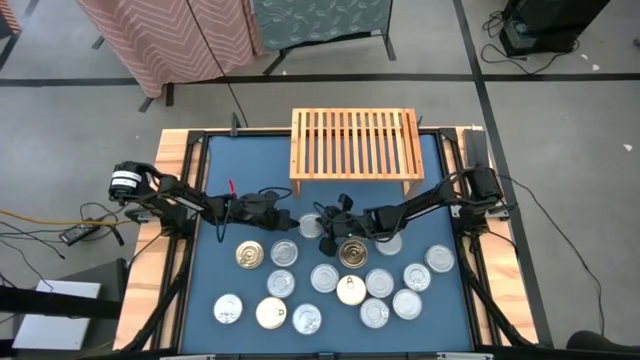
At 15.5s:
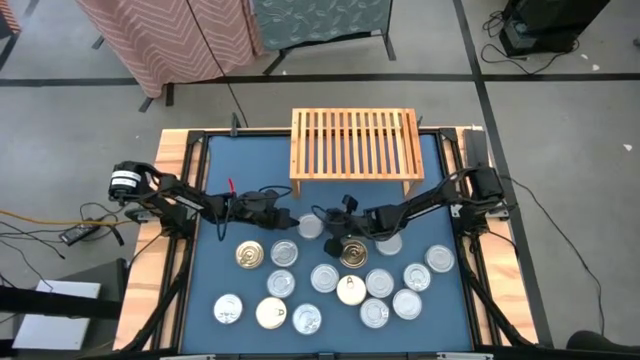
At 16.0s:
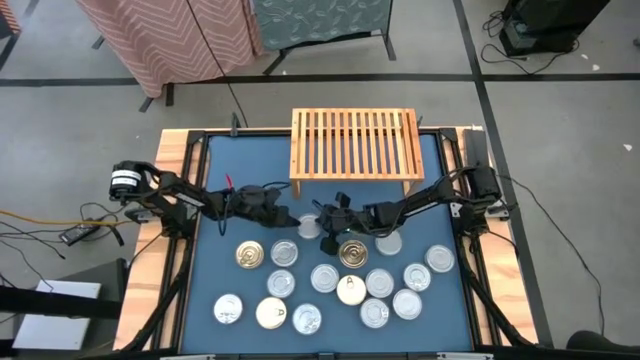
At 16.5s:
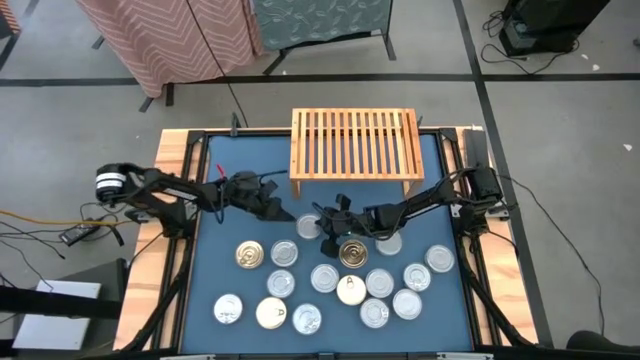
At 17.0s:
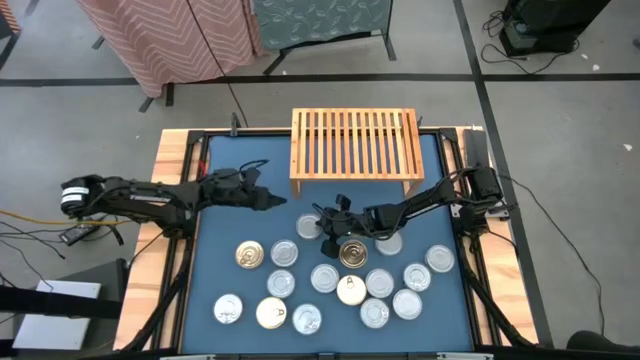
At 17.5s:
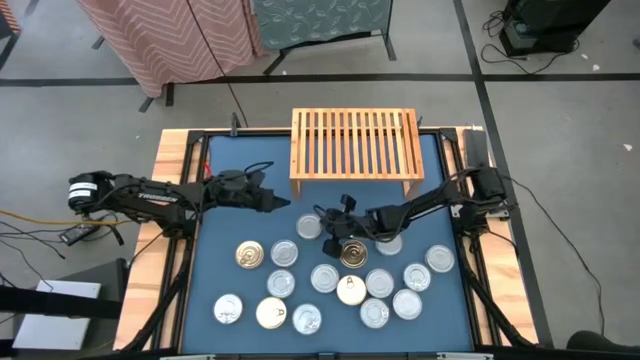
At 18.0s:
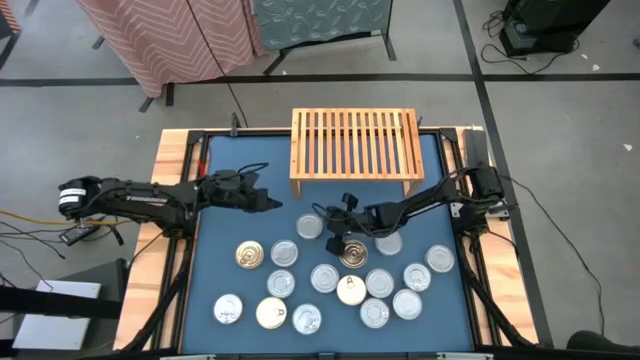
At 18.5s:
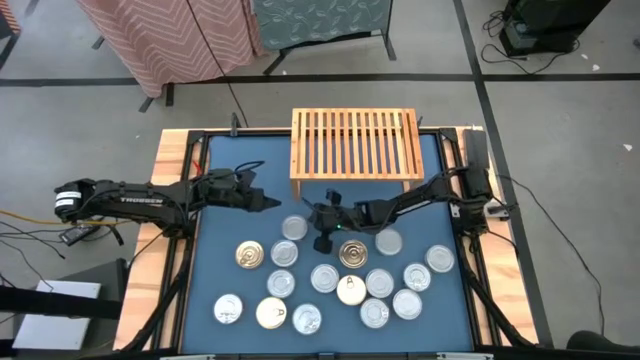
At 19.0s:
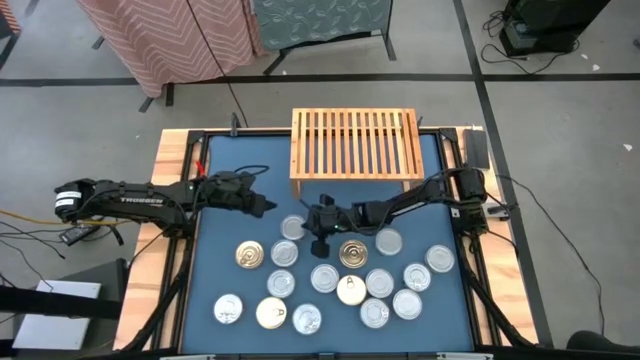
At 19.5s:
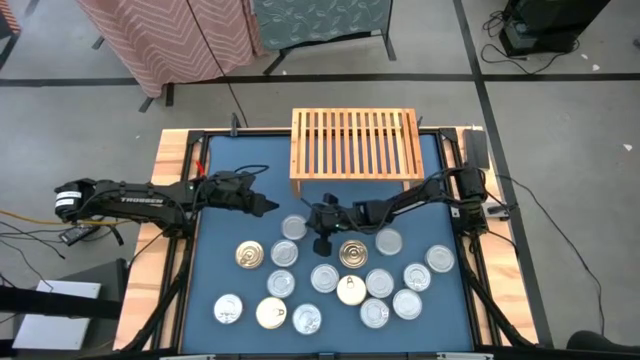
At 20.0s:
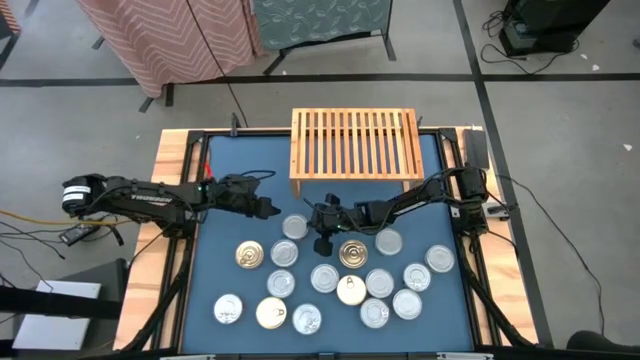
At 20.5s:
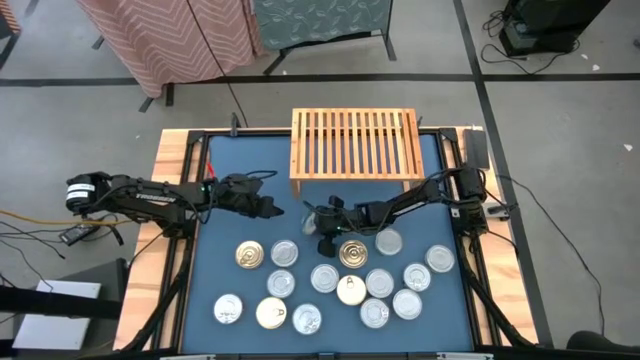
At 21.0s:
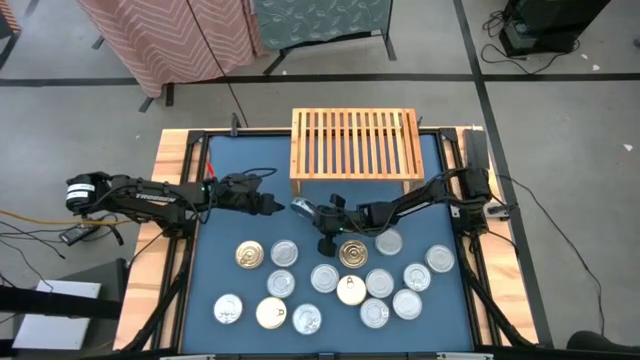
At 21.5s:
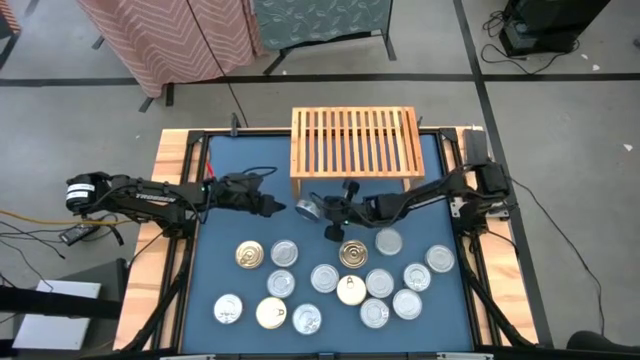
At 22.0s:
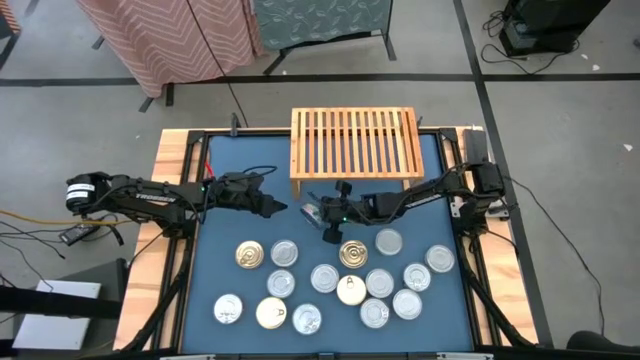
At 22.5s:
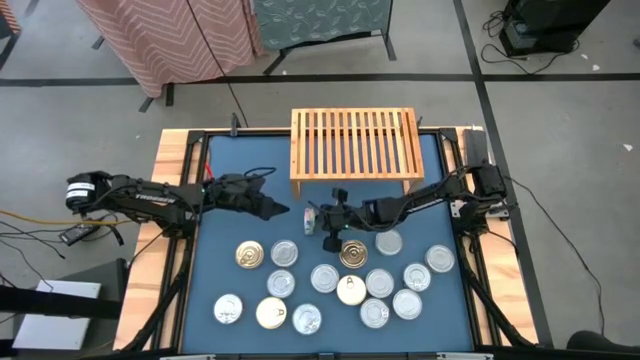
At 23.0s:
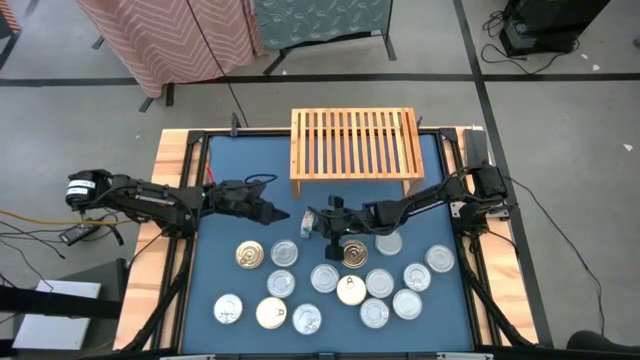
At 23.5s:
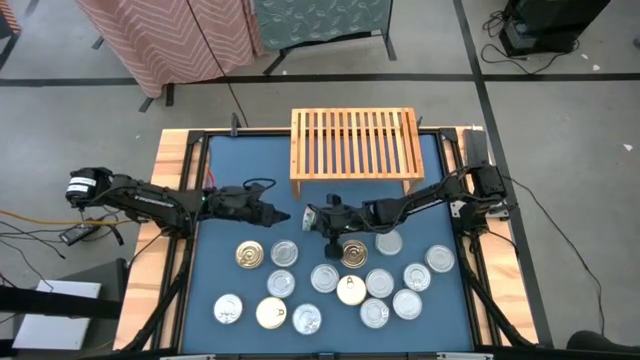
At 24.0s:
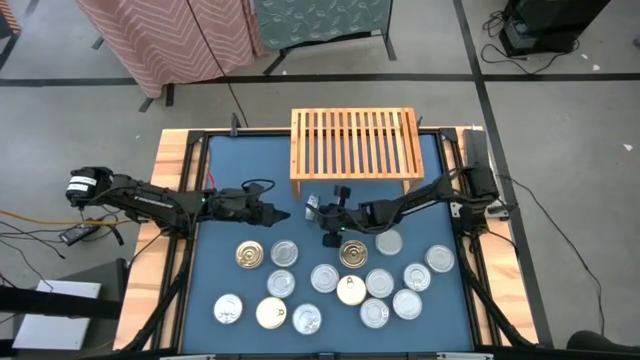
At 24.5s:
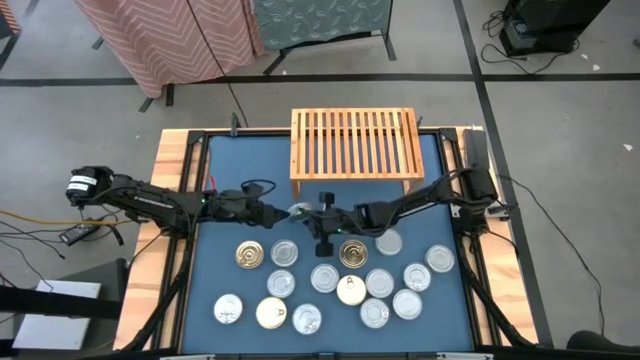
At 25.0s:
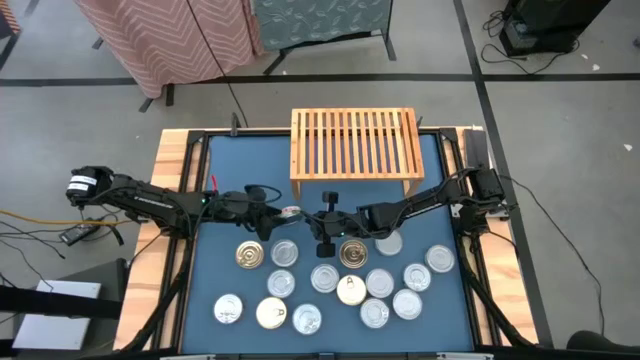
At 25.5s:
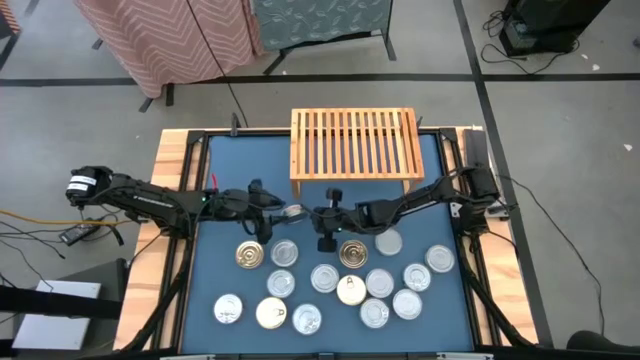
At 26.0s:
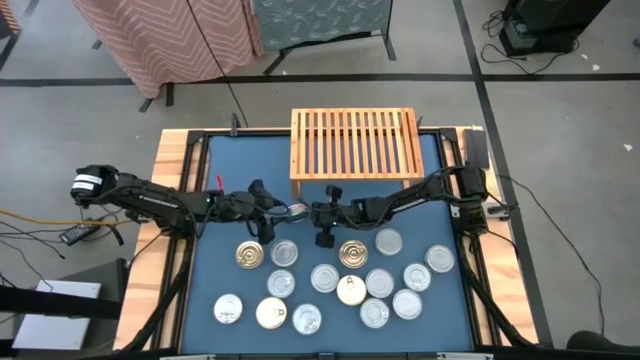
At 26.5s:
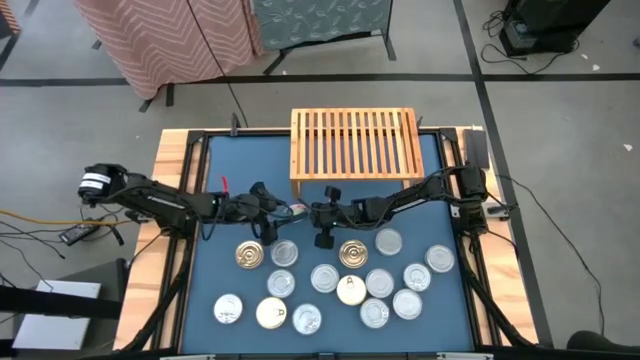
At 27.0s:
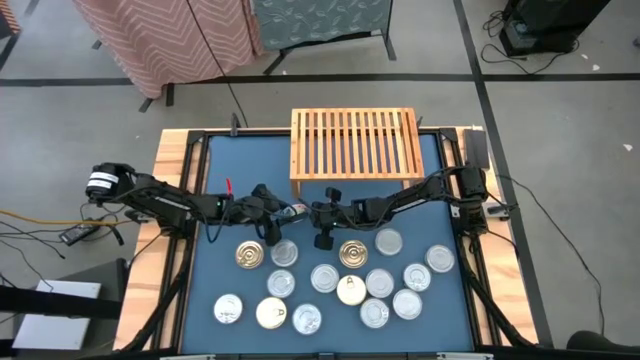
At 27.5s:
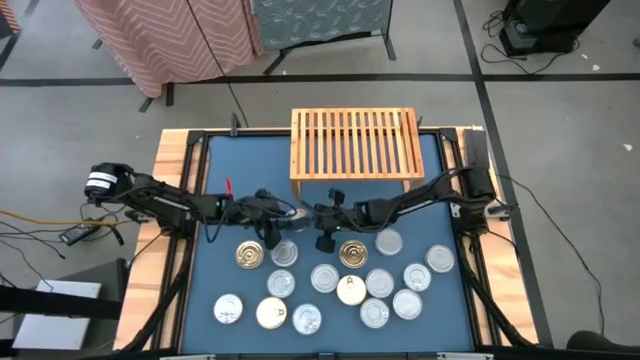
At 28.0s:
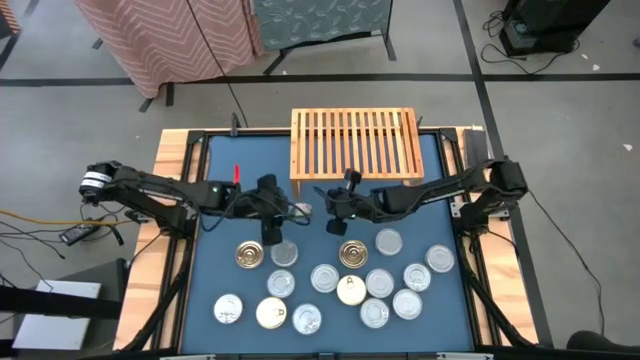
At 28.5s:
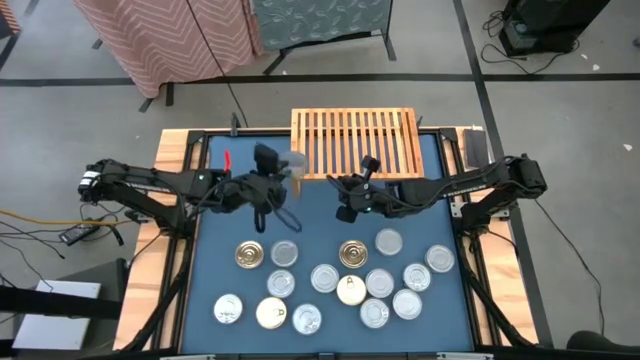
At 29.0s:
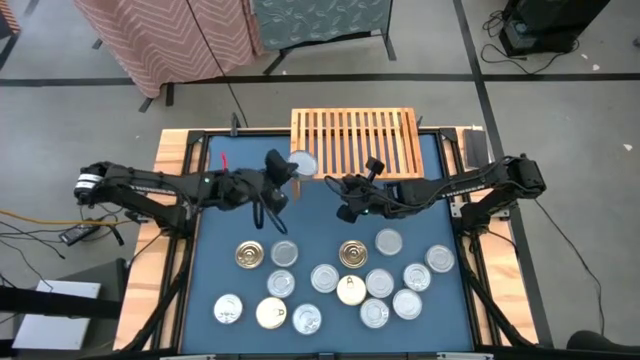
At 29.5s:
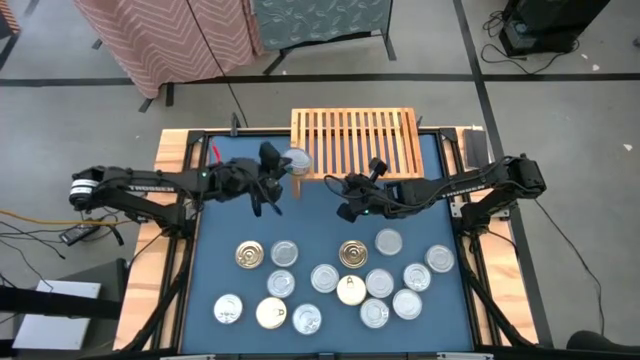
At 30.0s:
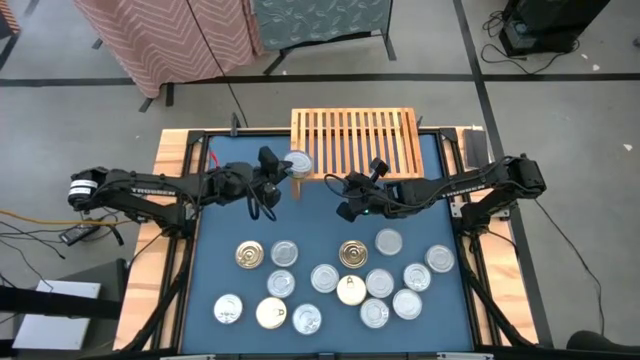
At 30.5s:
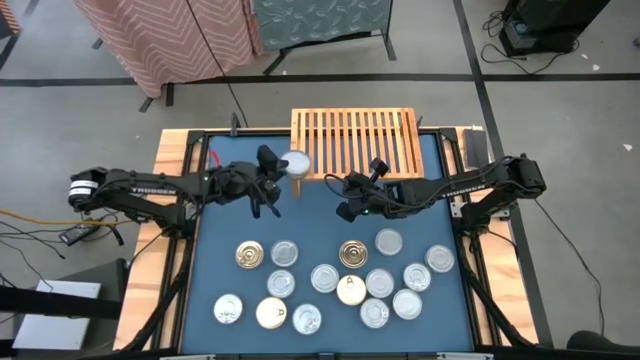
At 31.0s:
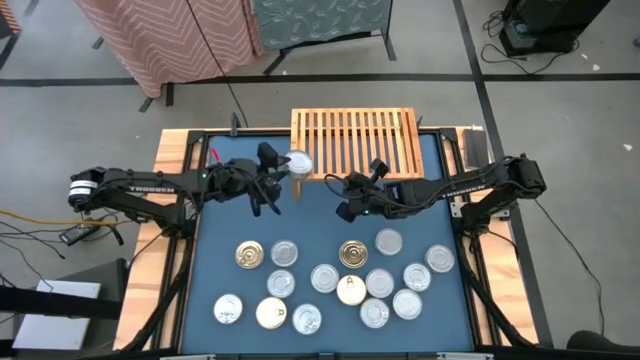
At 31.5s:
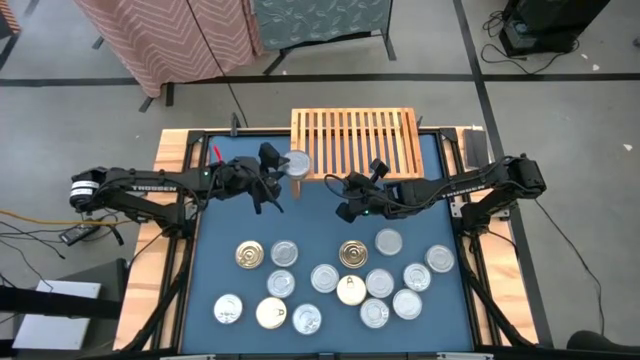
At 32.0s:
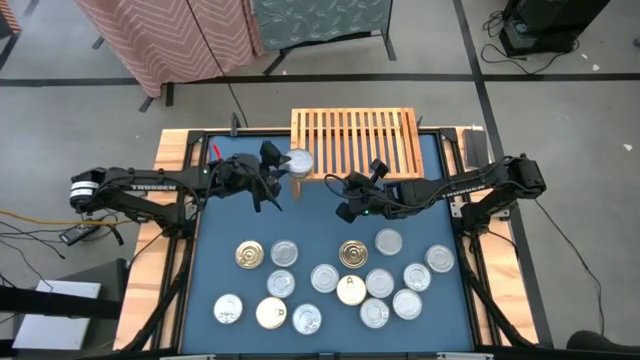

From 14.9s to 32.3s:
Task: Stack canned seafood by type on shelf
Put the green tuna can on the shelf

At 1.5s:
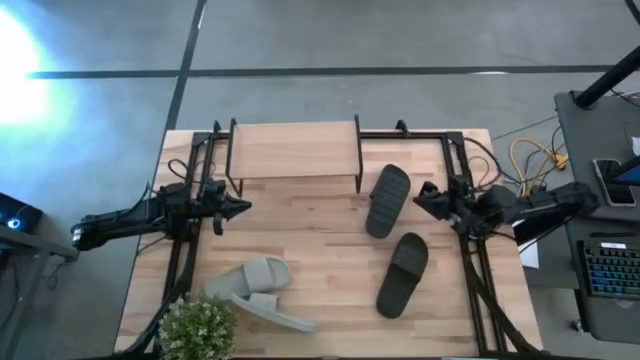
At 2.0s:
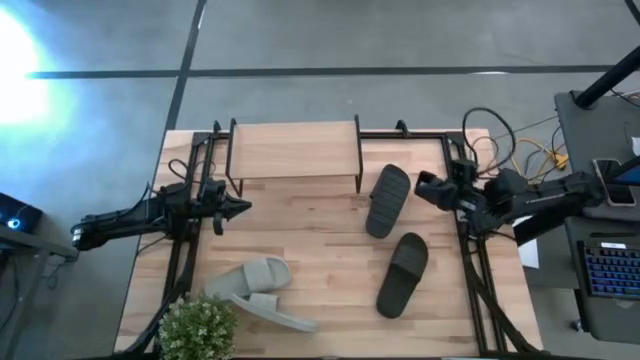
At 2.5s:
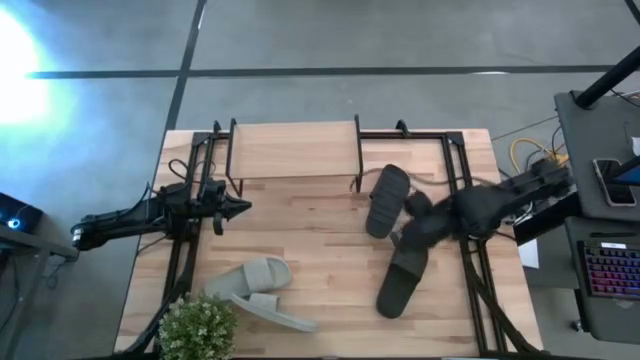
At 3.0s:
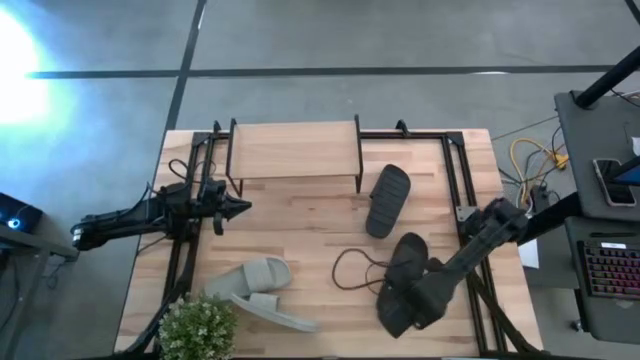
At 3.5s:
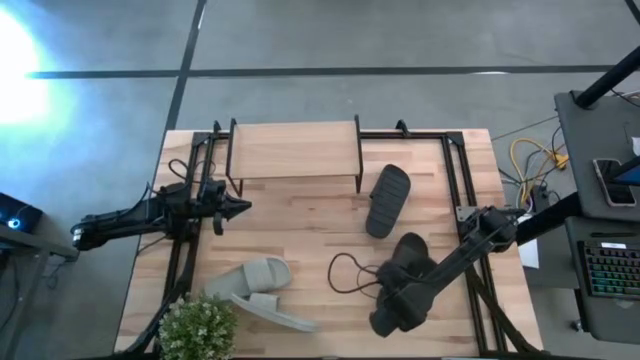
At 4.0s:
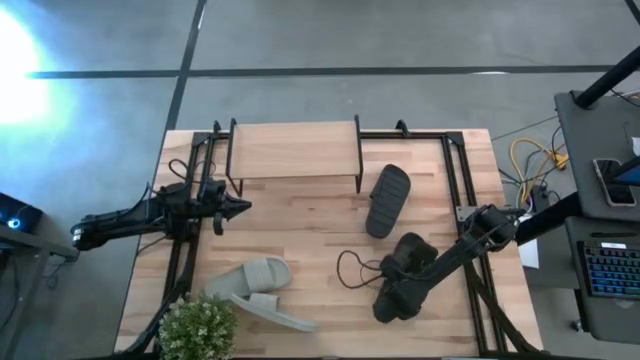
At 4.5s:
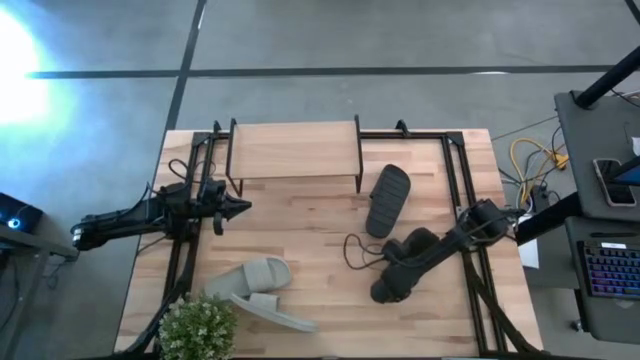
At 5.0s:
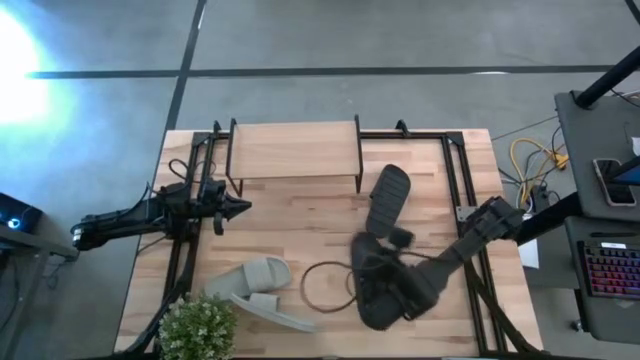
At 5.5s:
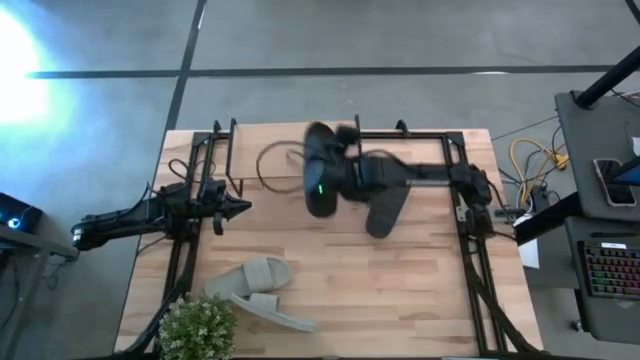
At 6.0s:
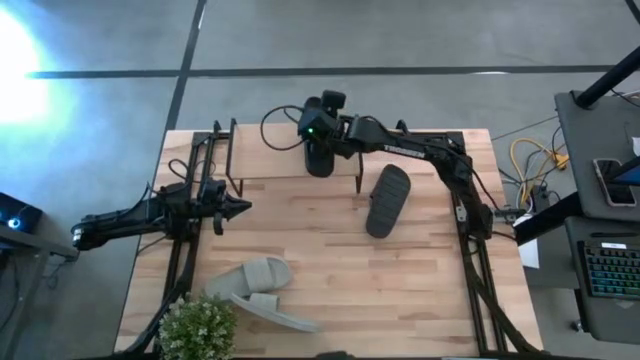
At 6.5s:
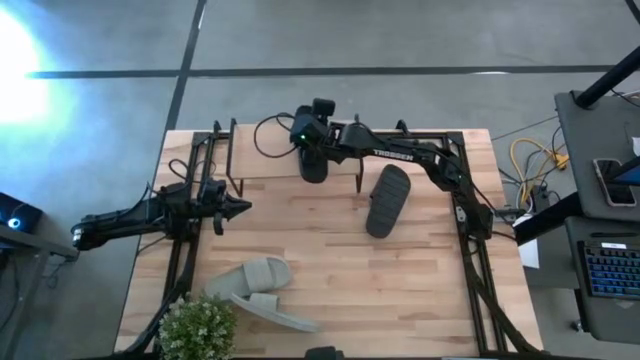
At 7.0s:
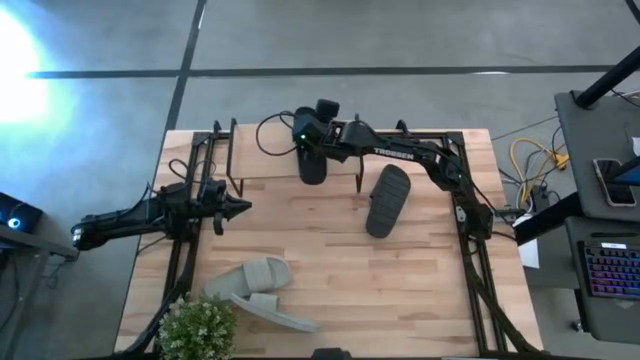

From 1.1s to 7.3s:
Task: Pick and place slides into the shelf
Put the bottom black slide on the shelf
